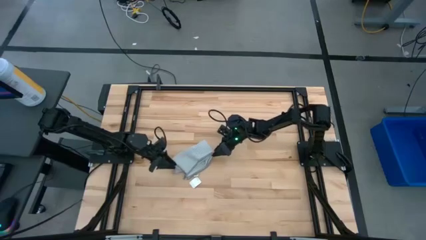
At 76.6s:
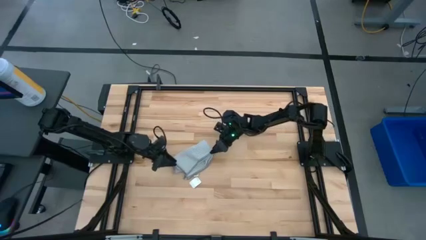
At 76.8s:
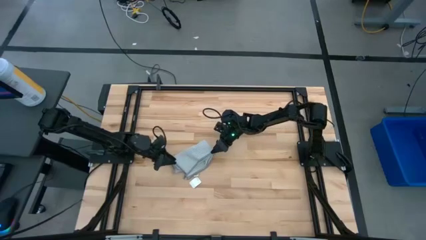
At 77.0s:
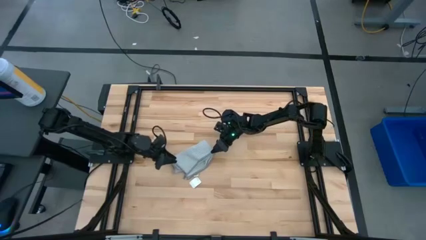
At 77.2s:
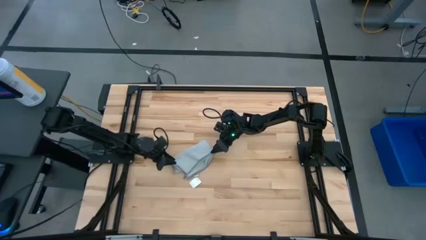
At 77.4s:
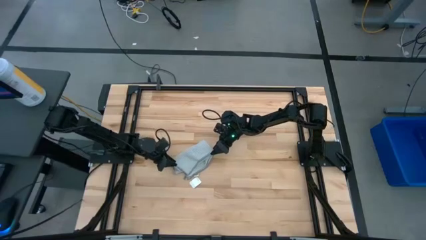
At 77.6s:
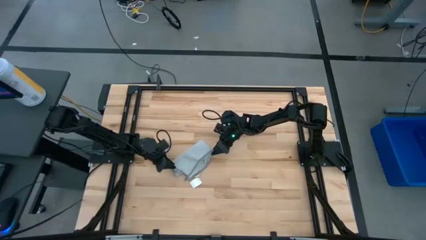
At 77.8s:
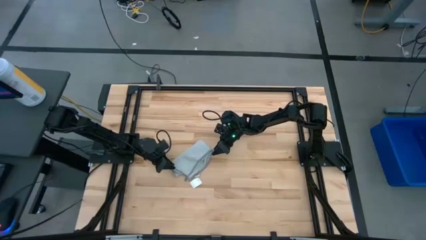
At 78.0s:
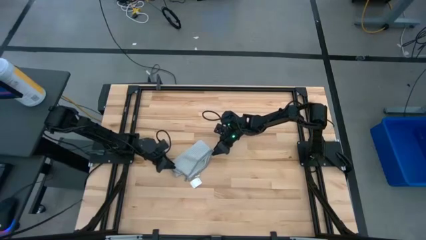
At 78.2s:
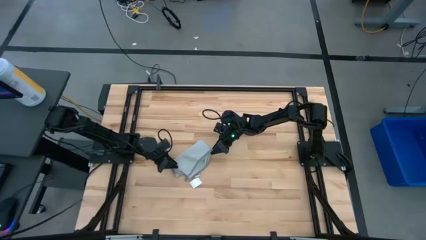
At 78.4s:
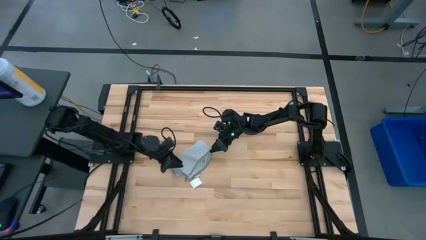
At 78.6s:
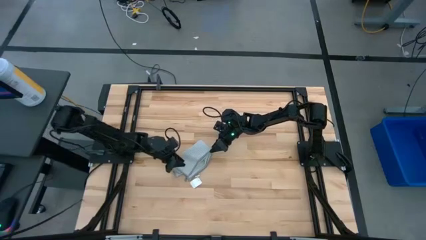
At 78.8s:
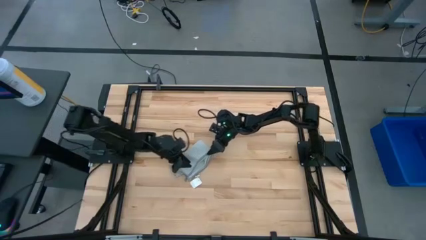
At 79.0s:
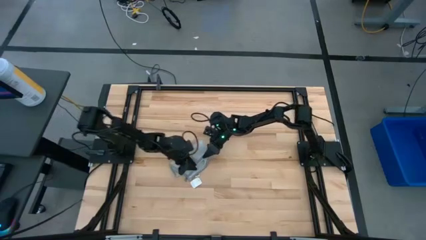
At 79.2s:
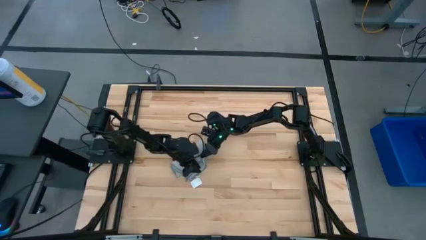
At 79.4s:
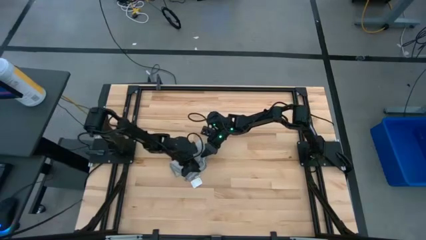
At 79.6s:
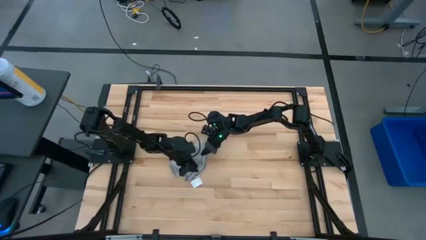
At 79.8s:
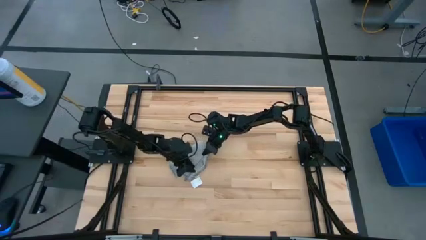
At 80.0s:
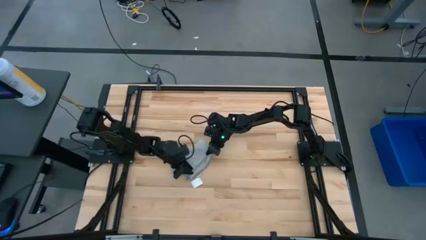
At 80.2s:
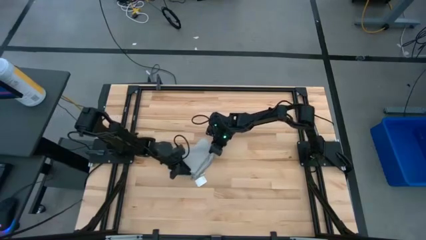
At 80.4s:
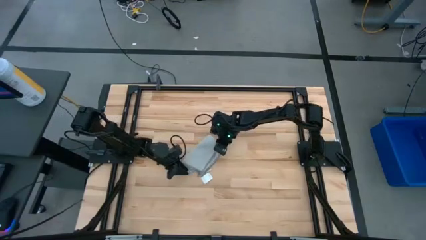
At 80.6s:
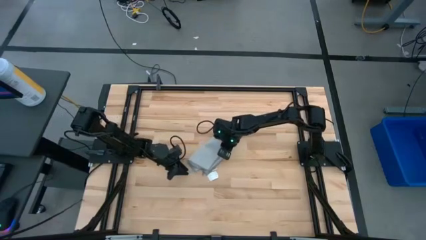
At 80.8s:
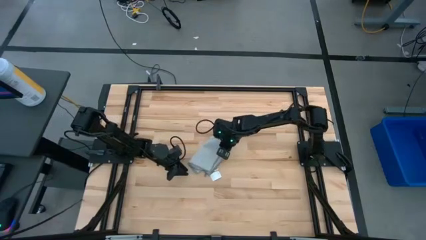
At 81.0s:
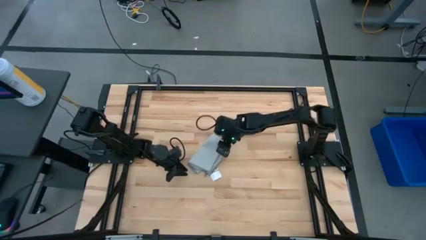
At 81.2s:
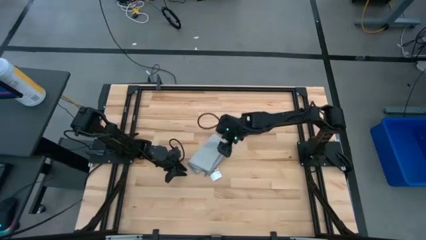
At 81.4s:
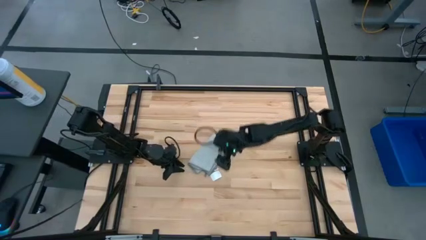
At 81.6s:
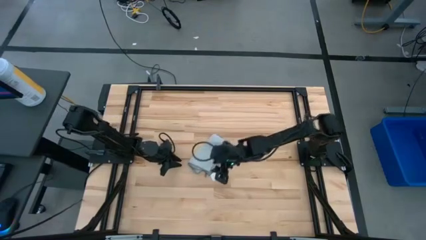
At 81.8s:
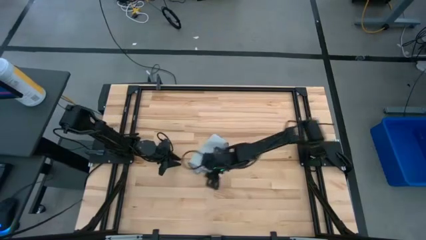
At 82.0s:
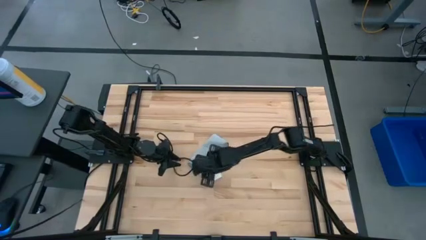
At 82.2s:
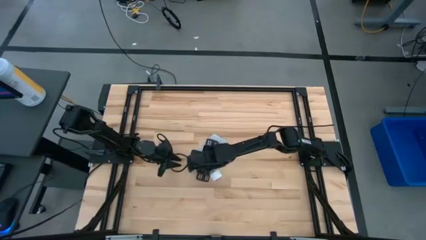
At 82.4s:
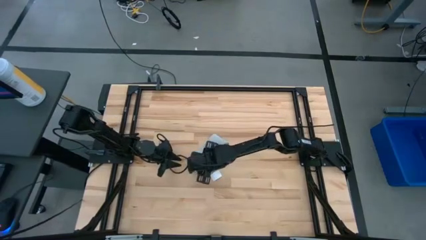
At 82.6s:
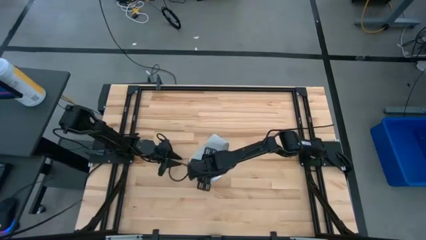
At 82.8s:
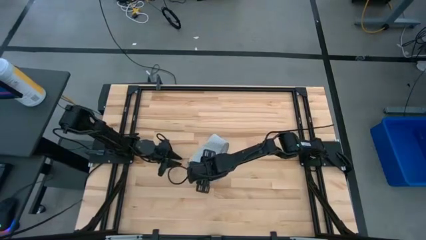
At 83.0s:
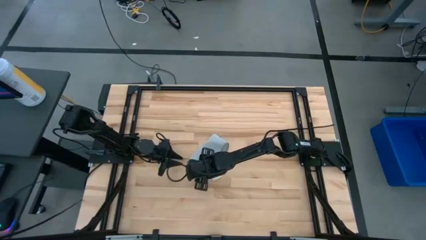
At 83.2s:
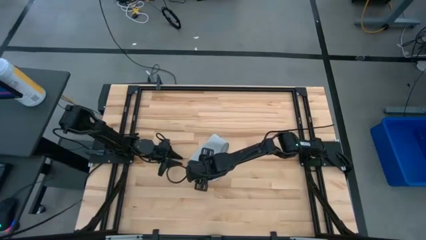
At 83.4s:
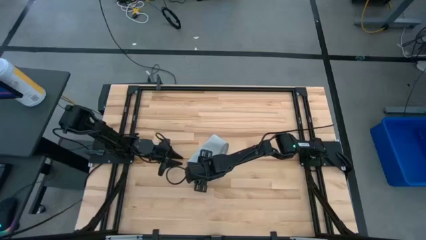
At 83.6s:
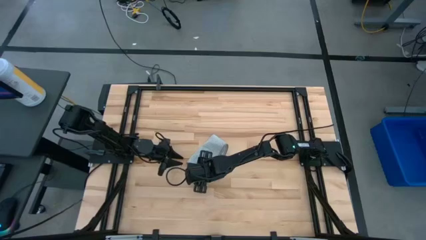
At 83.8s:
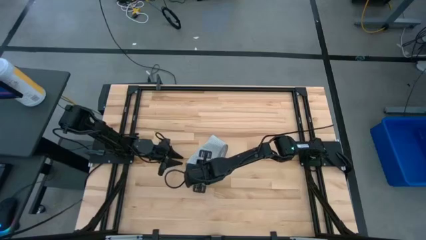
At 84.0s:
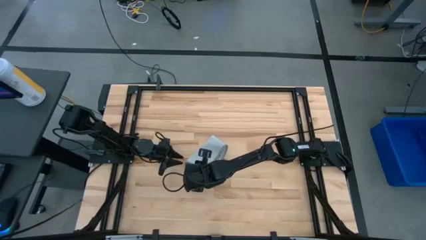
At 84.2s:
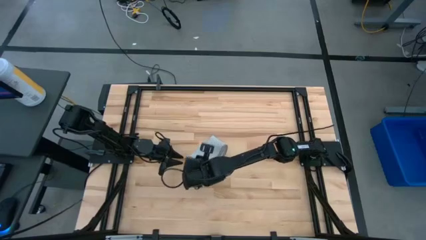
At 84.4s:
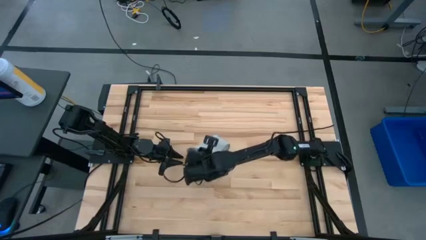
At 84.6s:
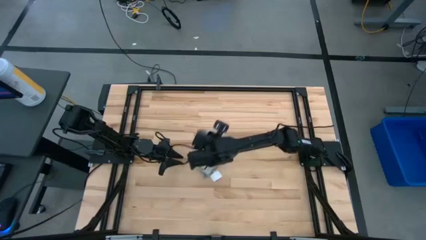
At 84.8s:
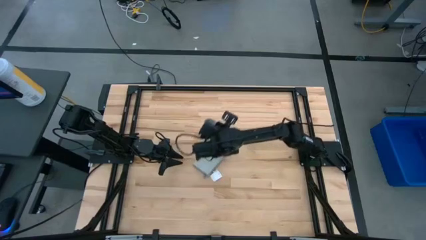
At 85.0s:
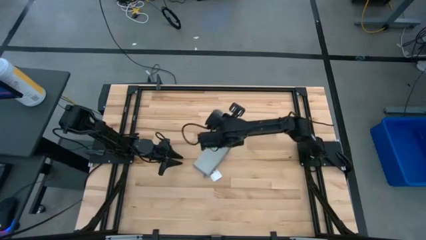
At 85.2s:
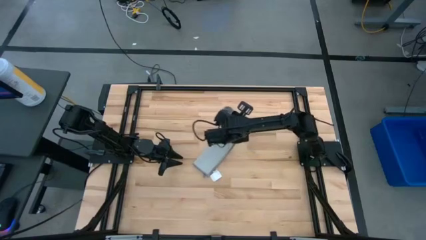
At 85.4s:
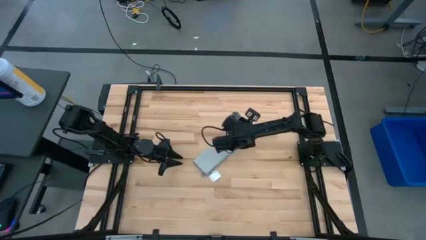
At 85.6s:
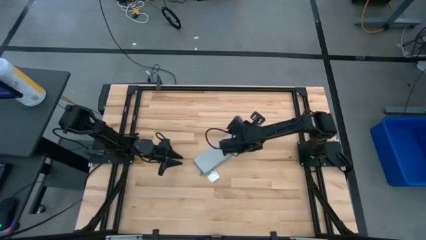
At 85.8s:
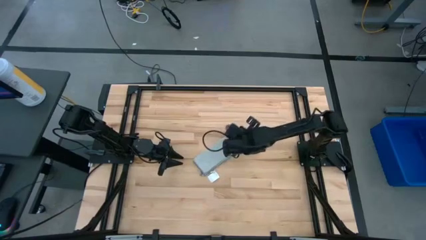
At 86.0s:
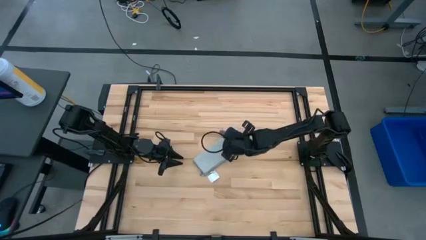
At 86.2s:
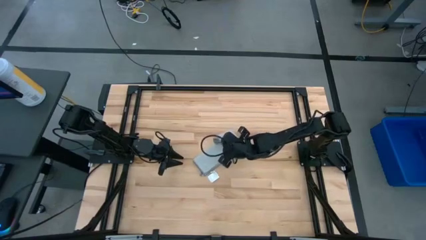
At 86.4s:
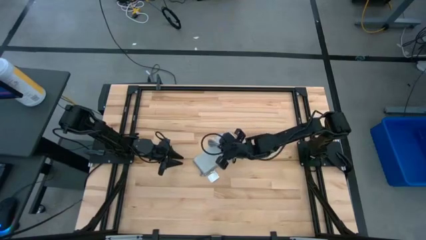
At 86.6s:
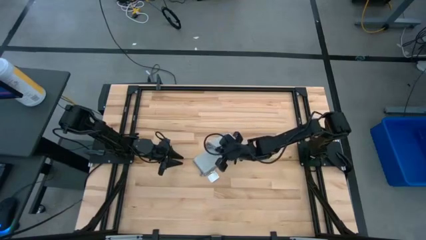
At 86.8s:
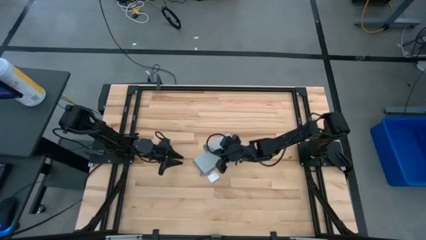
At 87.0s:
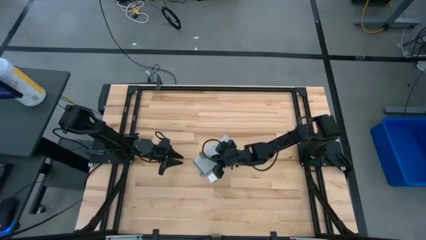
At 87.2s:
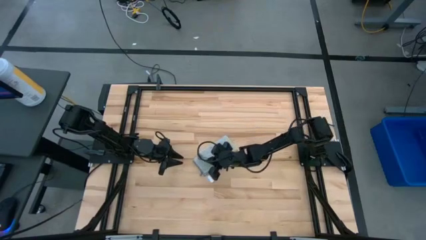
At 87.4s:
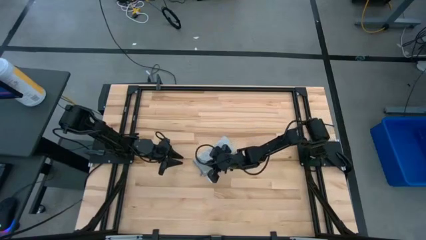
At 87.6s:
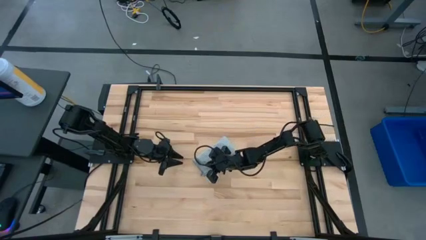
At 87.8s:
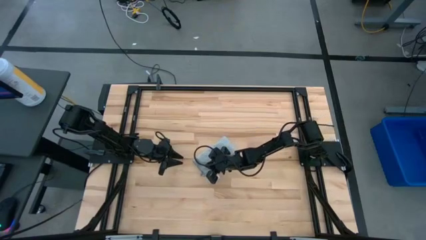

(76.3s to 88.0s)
Task: Fold microfiber towels
Fold the gray towel
